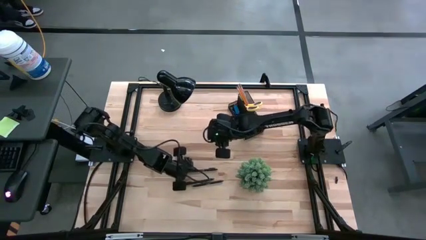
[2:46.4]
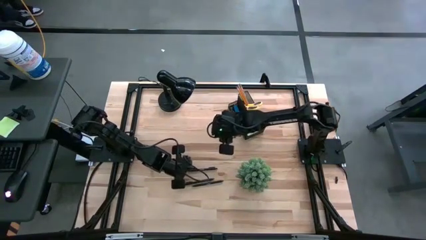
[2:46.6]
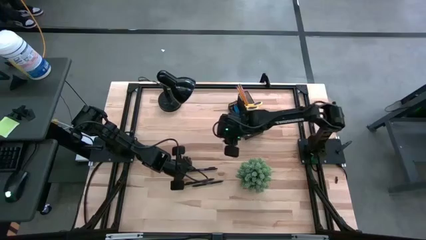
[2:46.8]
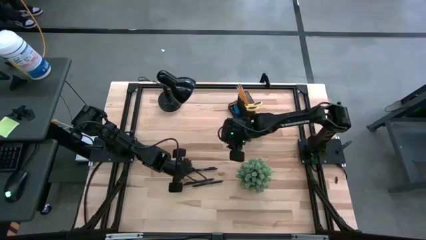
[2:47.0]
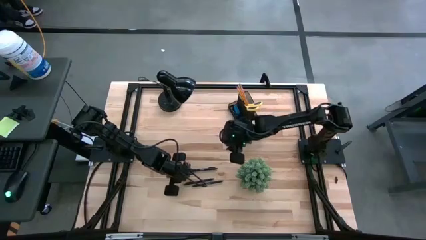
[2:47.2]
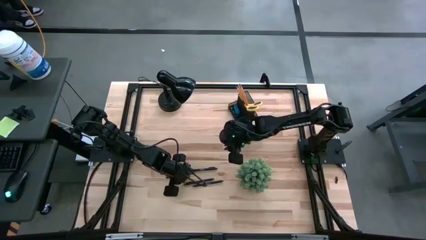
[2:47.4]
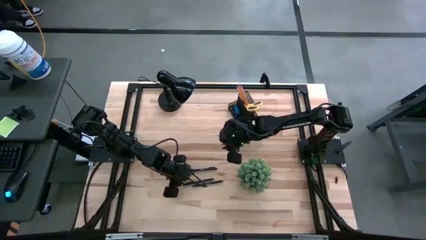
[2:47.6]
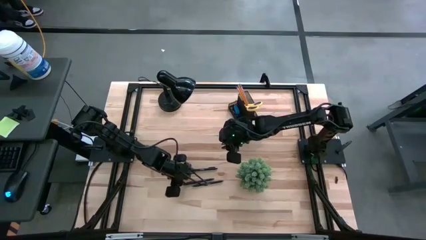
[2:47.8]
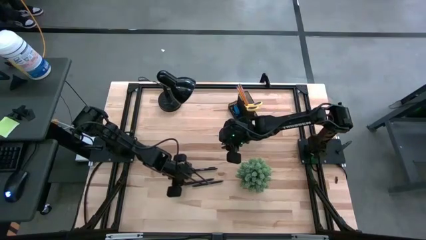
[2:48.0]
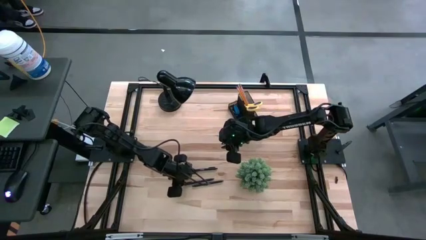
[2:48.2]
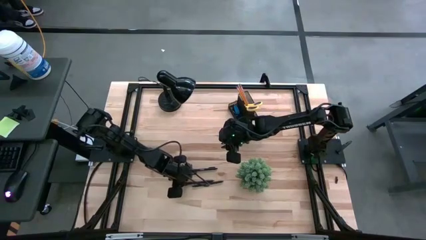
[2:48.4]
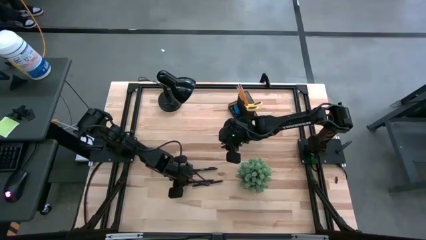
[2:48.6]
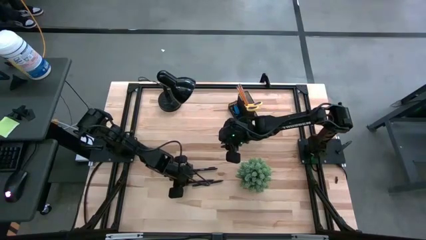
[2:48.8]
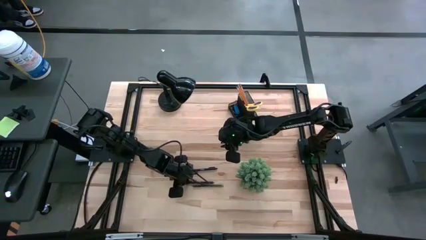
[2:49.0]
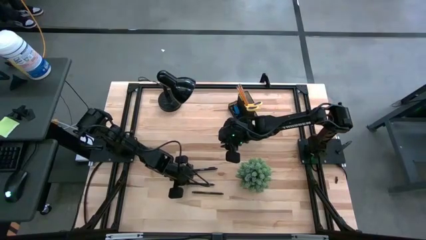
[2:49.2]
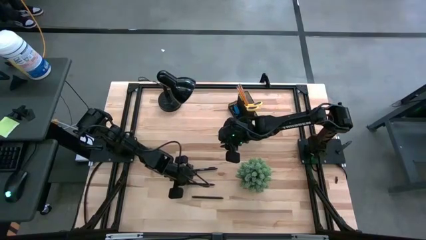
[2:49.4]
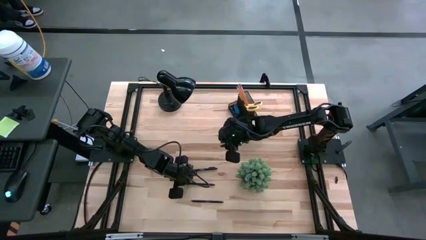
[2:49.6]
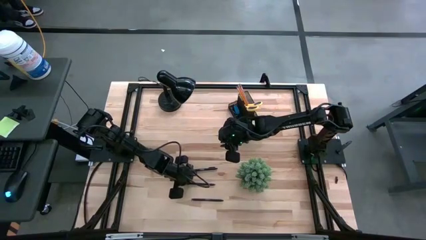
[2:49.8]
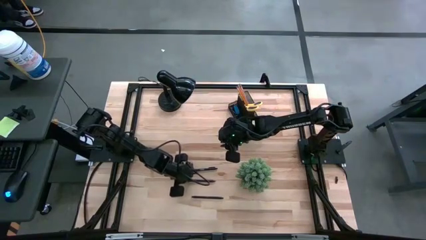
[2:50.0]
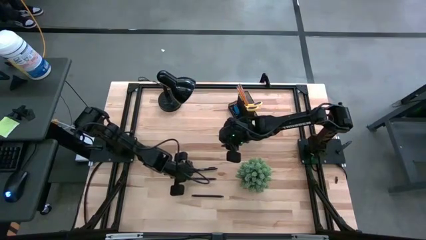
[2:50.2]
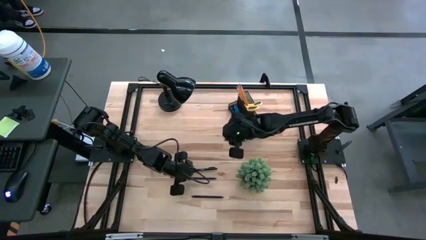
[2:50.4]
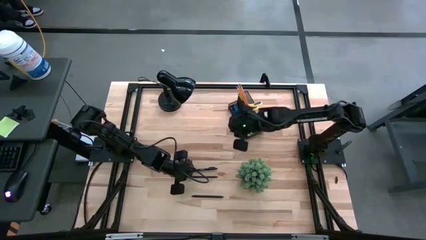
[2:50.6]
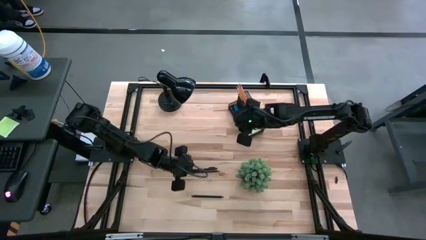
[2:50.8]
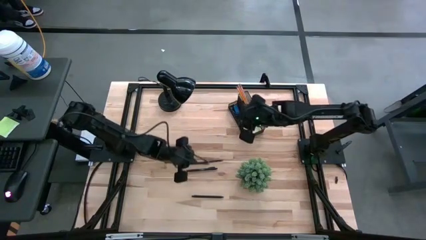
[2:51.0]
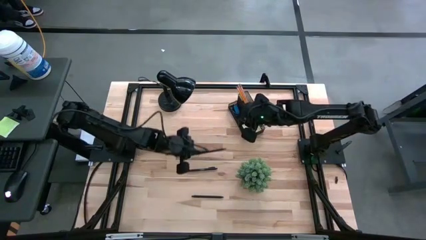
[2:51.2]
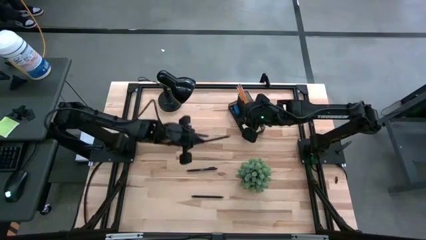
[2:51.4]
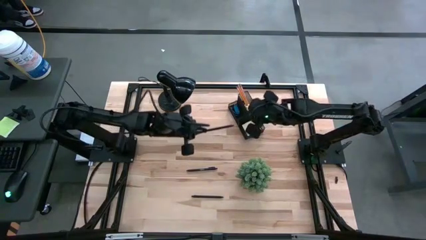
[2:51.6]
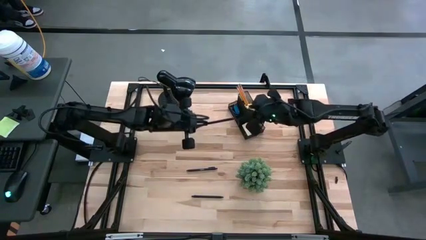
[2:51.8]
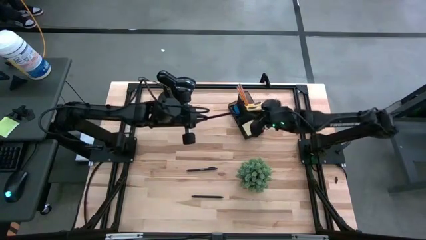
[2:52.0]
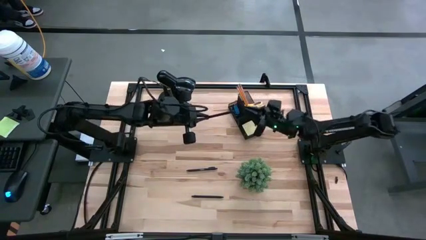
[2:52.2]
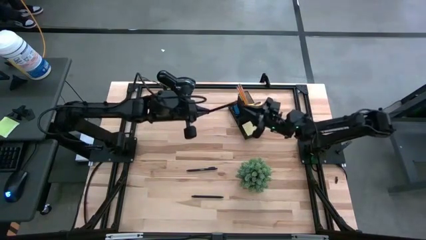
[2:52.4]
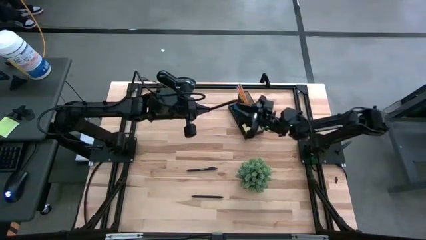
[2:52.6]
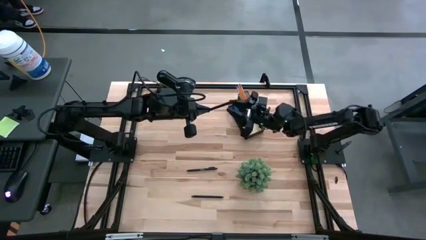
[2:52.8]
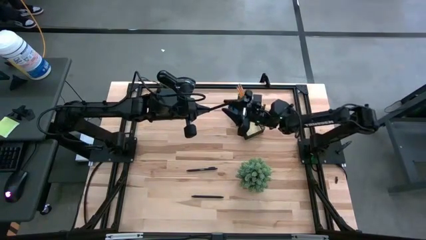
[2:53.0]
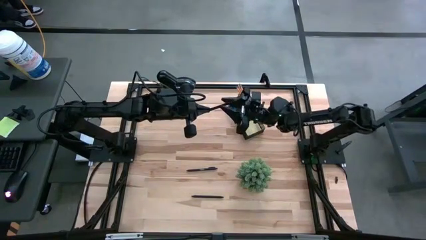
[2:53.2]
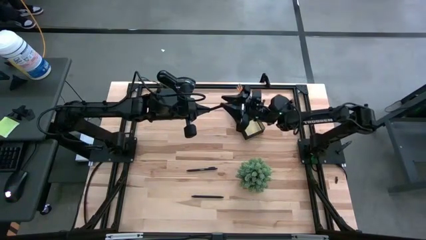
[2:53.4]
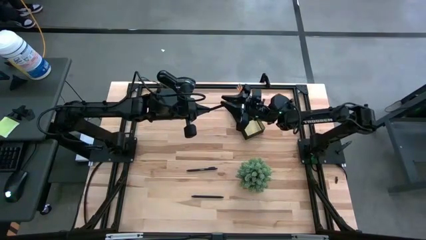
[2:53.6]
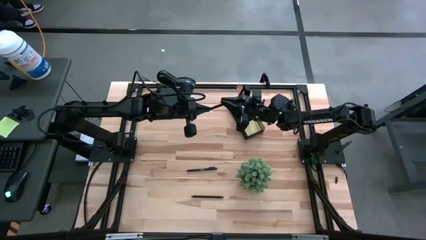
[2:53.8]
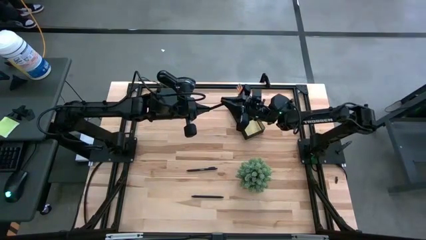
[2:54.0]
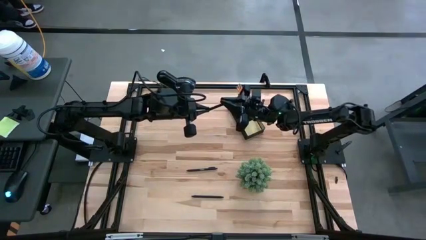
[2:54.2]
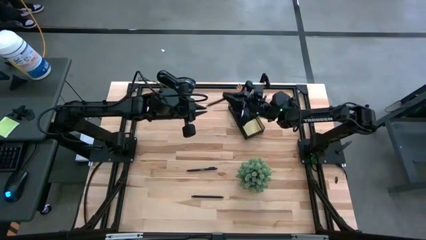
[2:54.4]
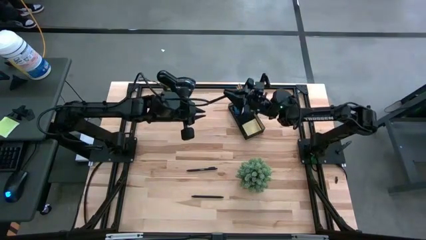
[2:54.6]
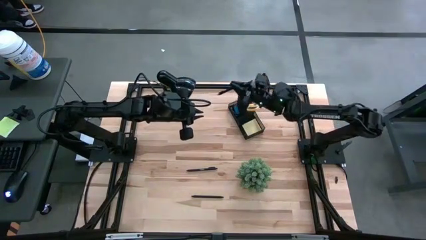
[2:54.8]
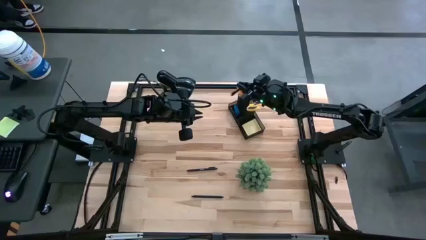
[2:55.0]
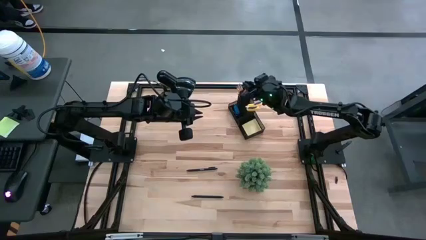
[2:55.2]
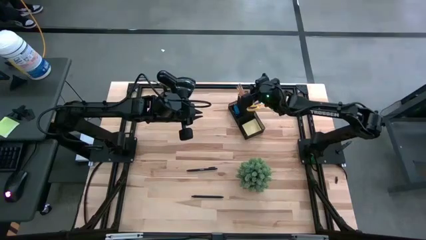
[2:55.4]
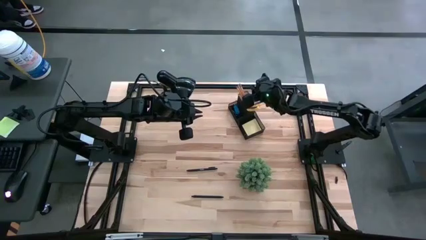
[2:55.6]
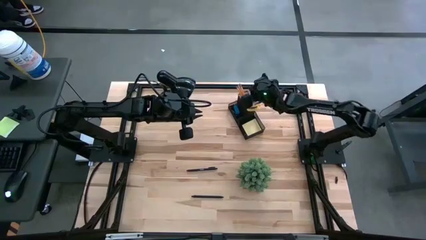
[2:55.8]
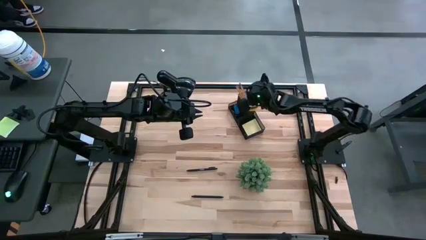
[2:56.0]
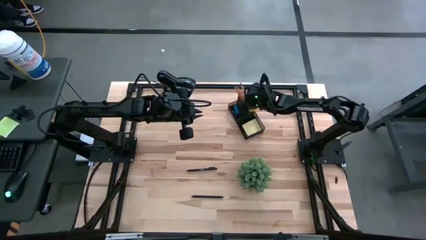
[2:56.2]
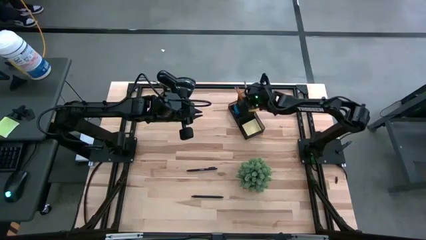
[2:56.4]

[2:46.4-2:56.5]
Task: Pick and place office supplies into organizer
Put the middle black pen into the desk organizer

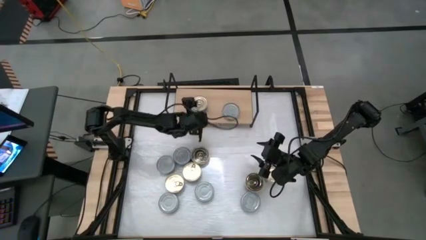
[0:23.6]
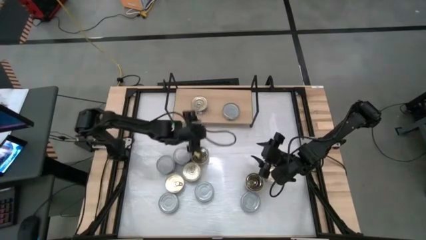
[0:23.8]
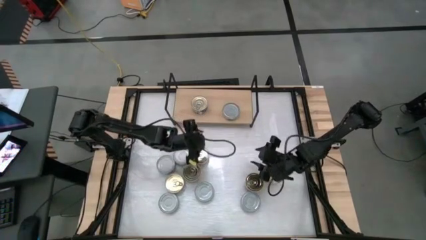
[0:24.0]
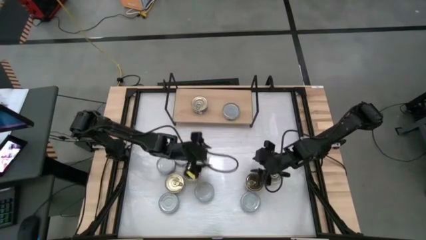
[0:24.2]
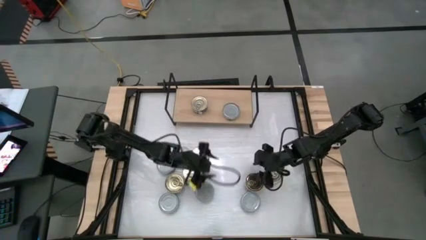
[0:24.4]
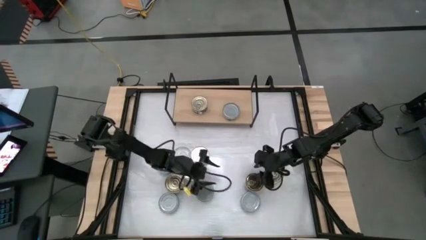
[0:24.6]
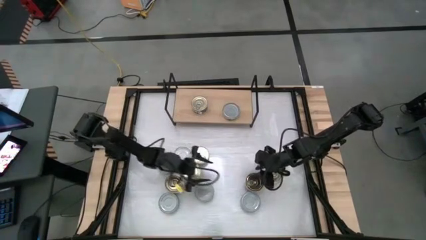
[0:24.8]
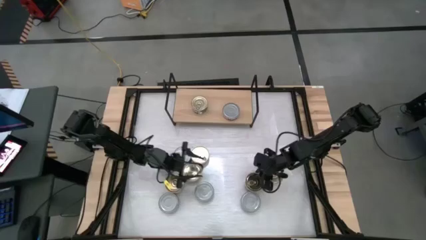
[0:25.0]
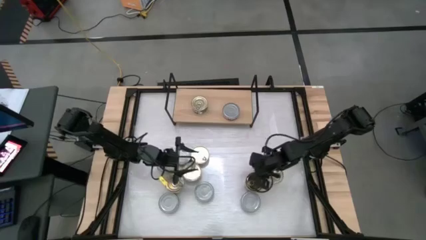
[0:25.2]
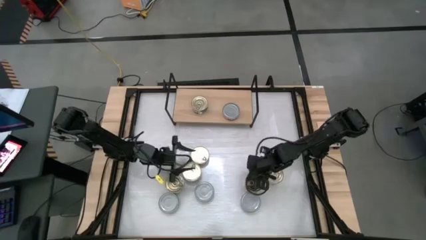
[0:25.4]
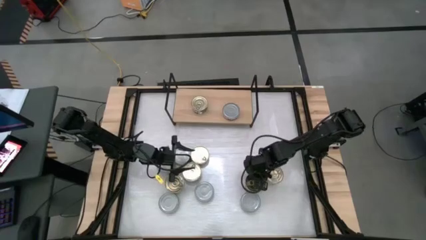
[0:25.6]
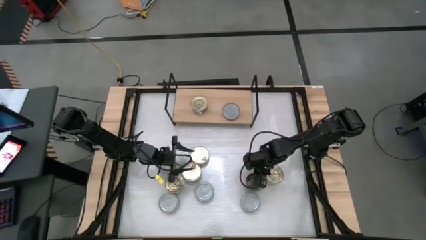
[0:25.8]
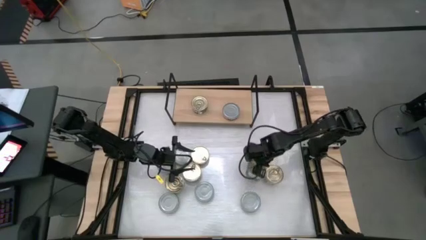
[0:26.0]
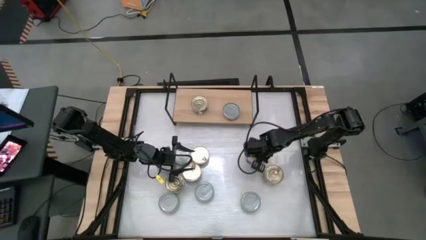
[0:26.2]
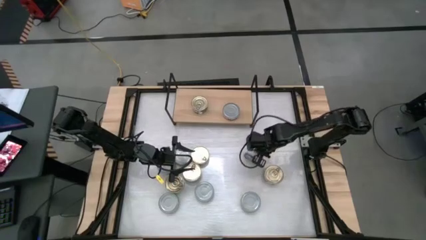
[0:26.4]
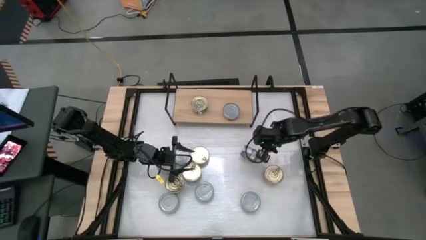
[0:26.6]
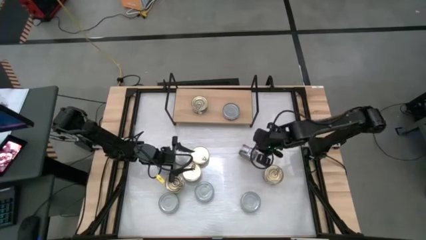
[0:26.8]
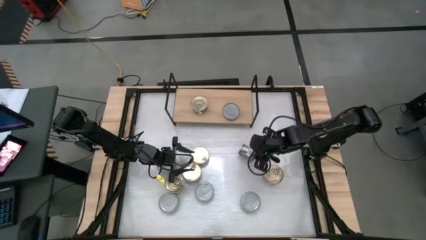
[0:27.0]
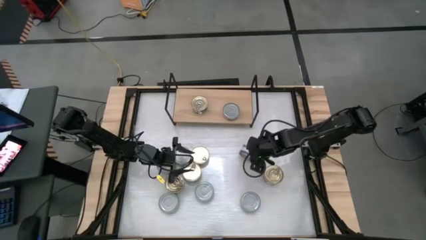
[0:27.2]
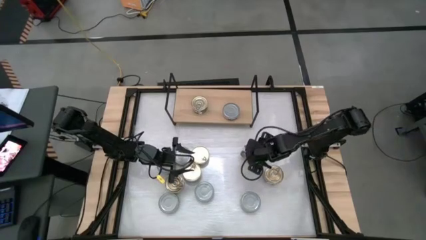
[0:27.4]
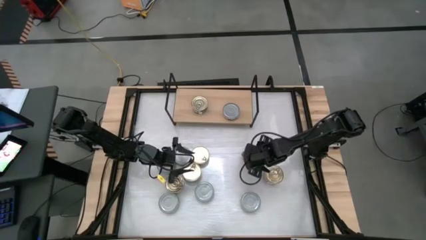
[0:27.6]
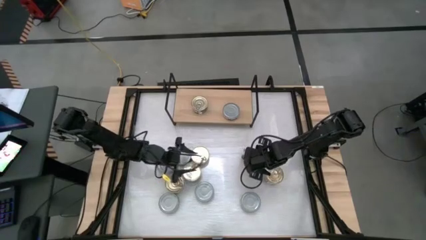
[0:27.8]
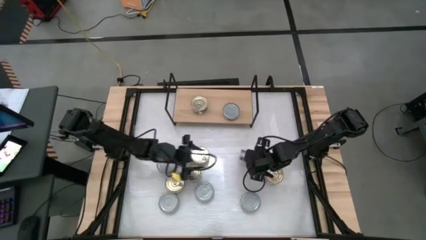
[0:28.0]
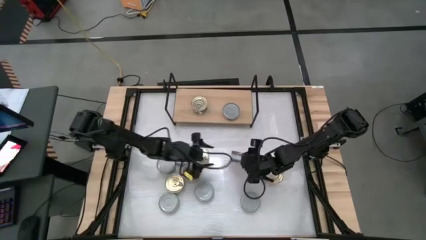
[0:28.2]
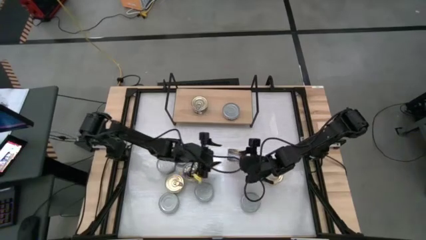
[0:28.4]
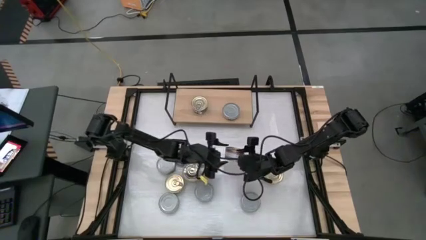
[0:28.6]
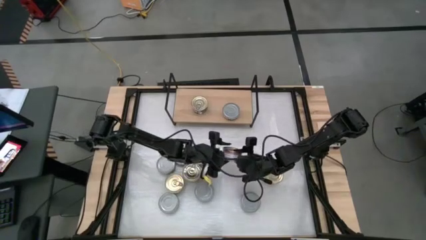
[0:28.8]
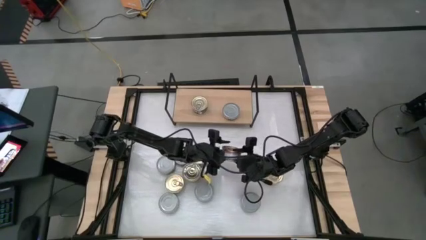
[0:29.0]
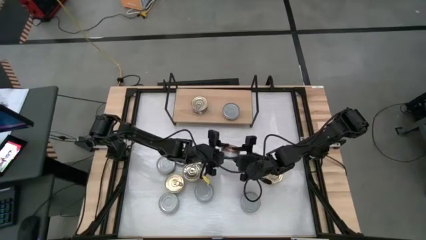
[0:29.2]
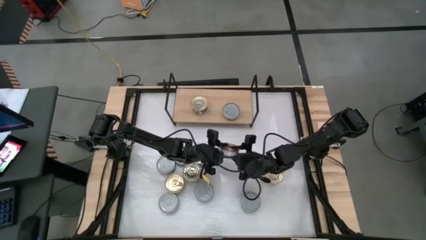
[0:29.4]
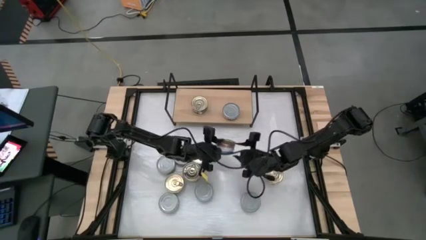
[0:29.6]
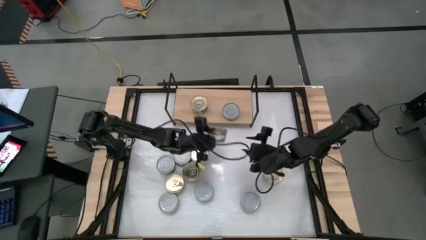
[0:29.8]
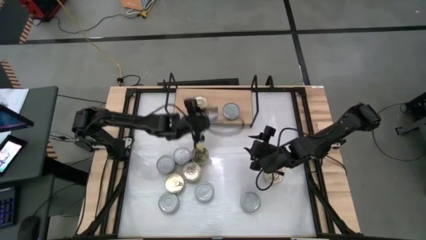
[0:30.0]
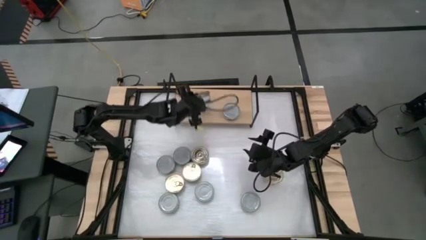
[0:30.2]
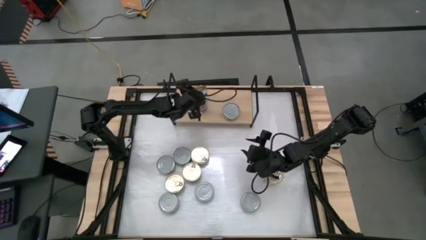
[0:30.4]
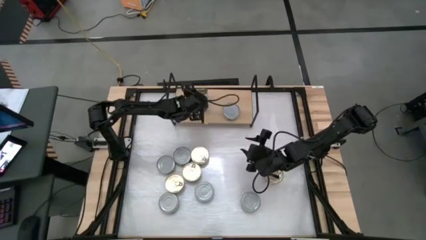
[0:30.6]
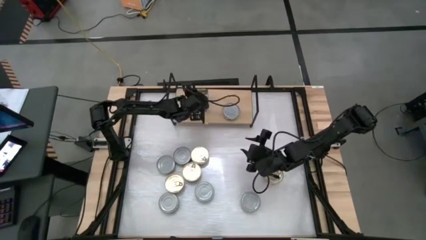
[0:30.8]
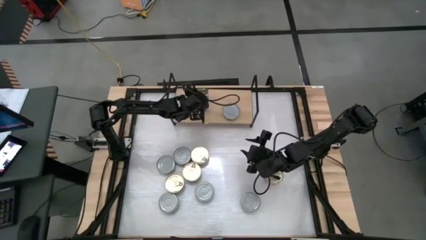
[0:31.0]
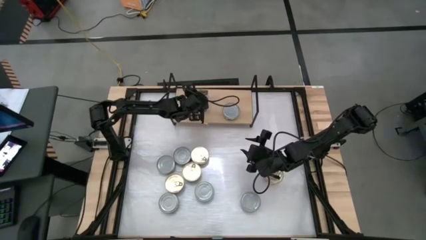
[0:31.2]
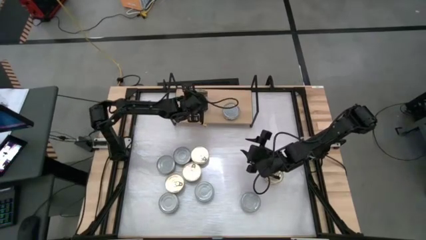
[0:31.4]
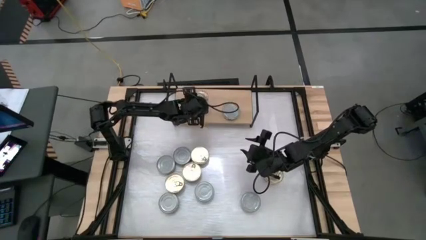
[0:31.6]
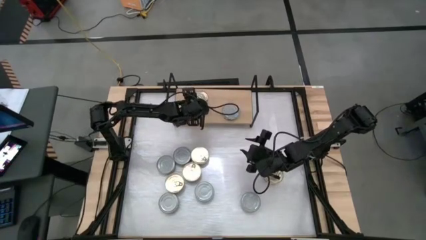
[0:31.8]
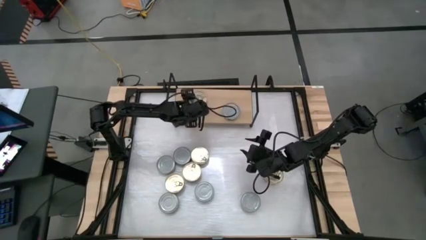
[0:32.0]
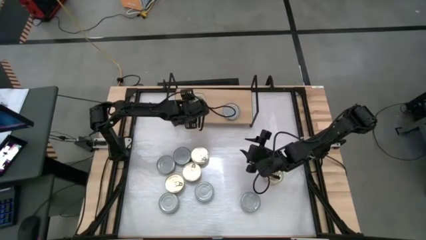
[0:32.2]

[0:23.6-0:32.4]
Task: Stack canned seafood by type on shelf
Stack the blue-pink tuna can on top of the other blue-pink tuna can on the shelf
